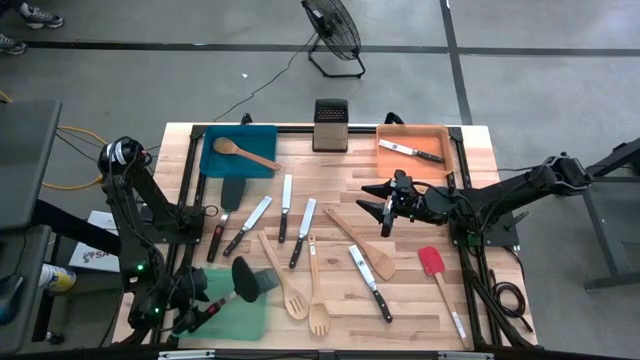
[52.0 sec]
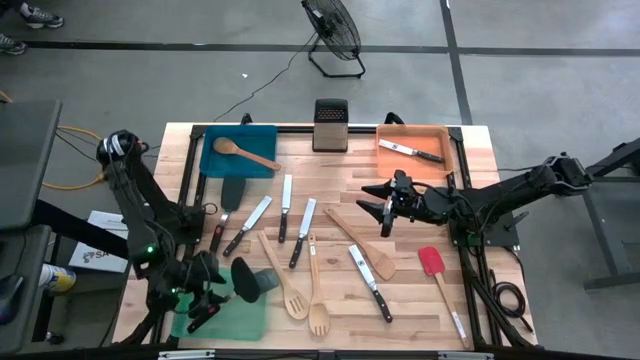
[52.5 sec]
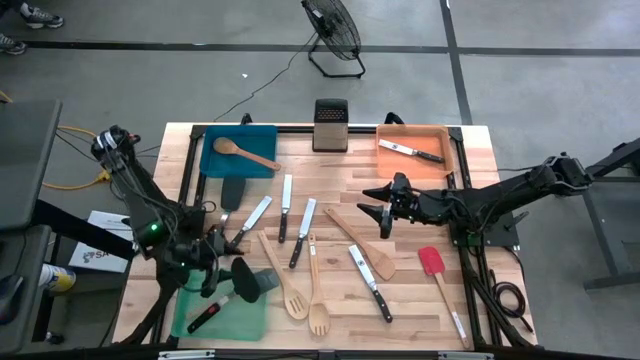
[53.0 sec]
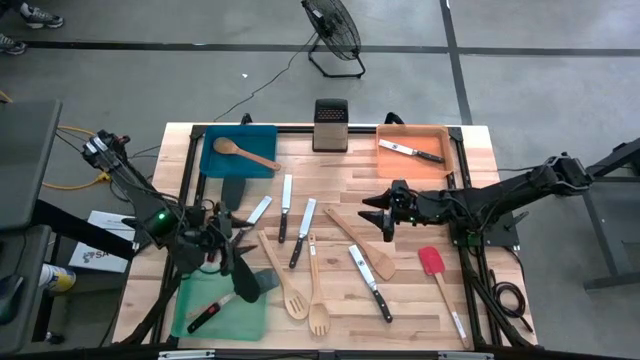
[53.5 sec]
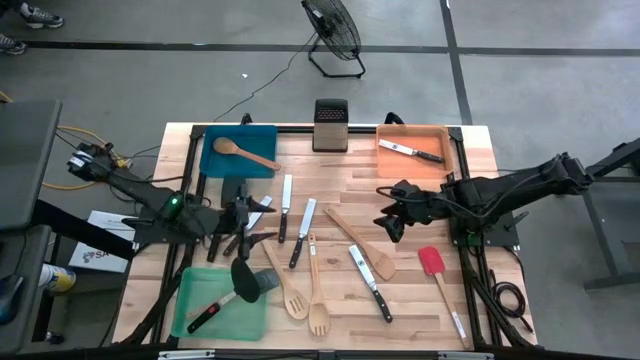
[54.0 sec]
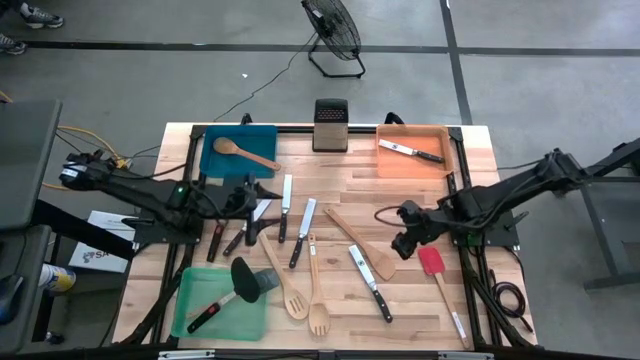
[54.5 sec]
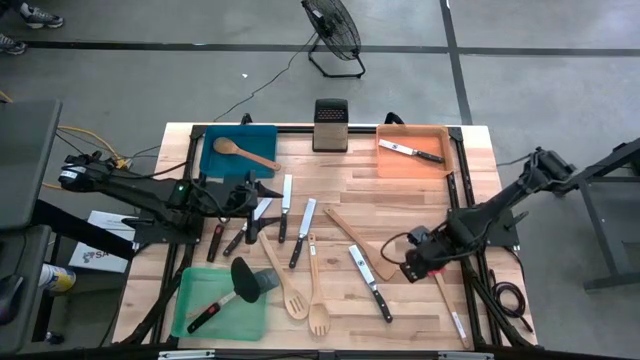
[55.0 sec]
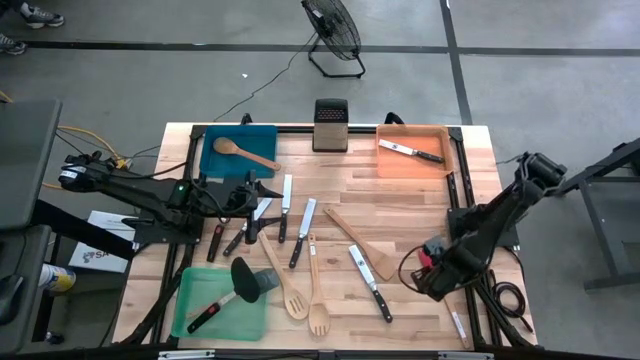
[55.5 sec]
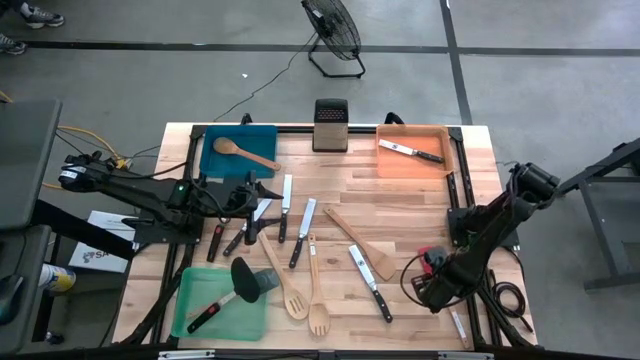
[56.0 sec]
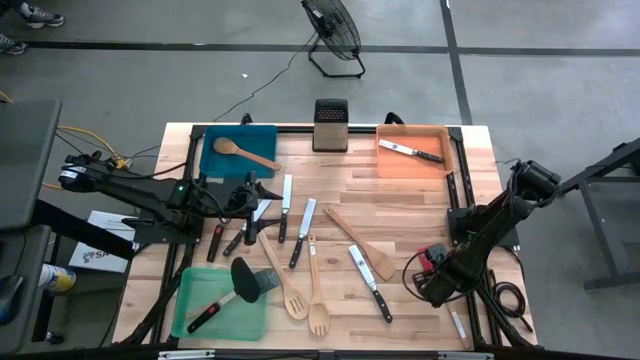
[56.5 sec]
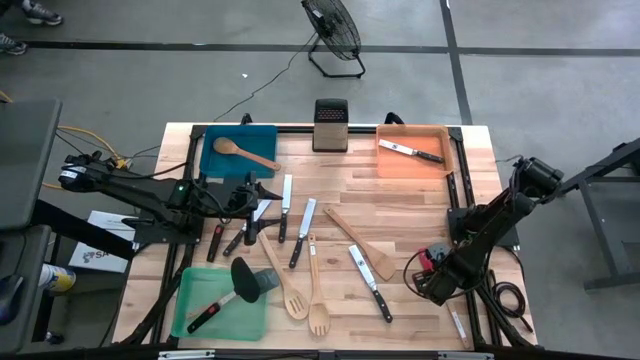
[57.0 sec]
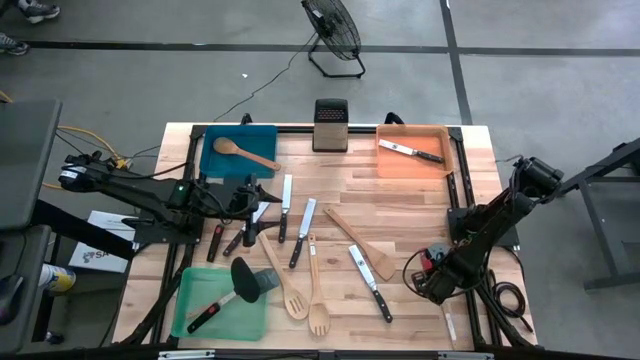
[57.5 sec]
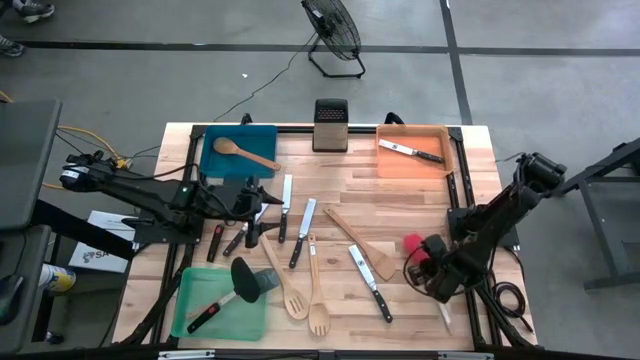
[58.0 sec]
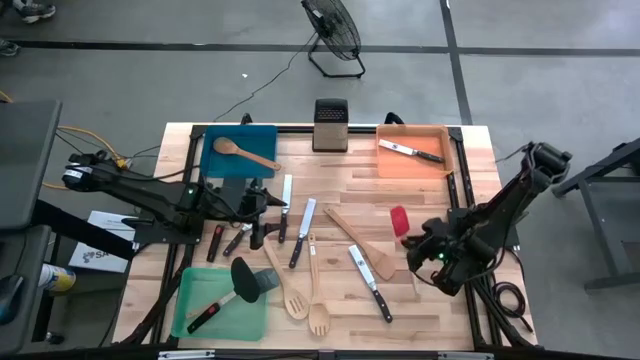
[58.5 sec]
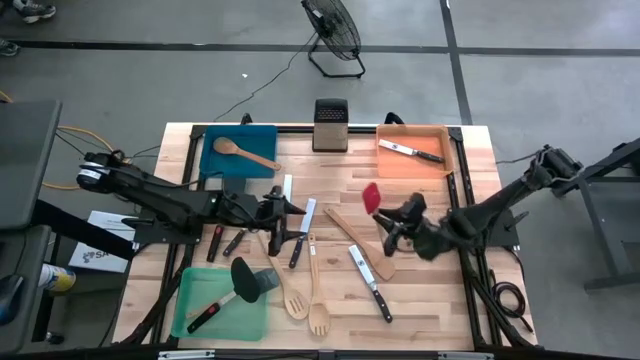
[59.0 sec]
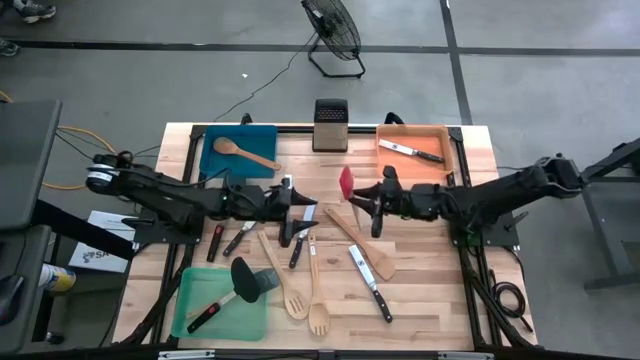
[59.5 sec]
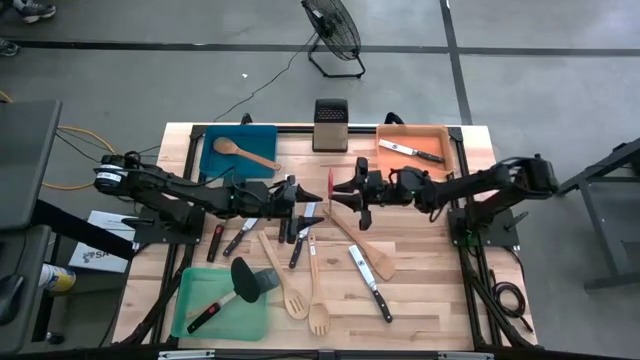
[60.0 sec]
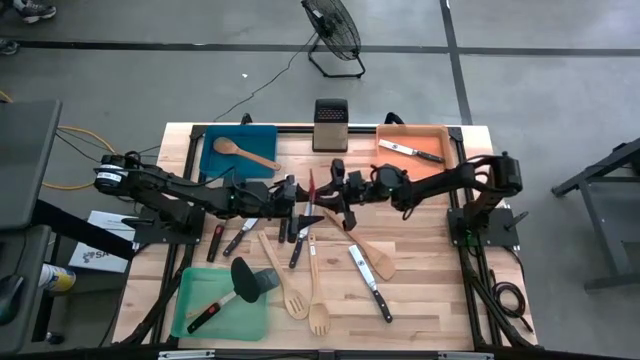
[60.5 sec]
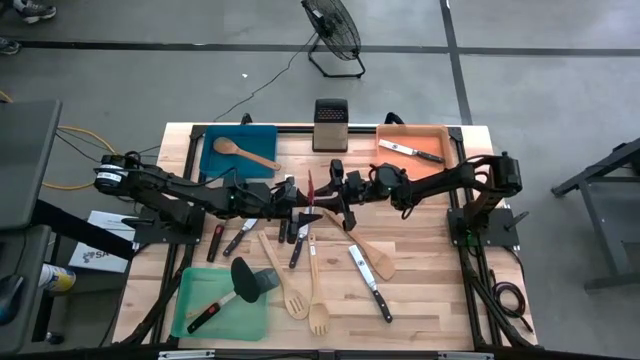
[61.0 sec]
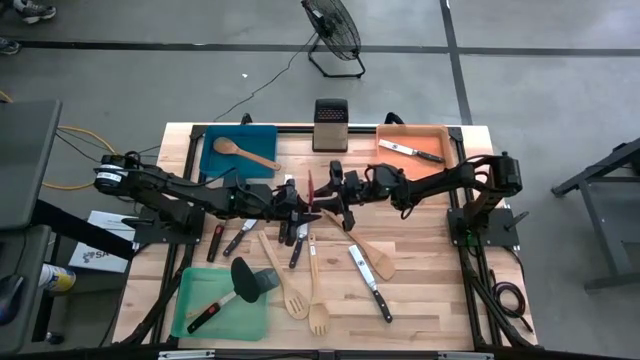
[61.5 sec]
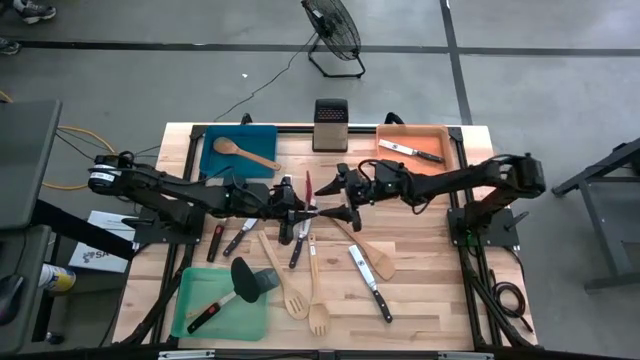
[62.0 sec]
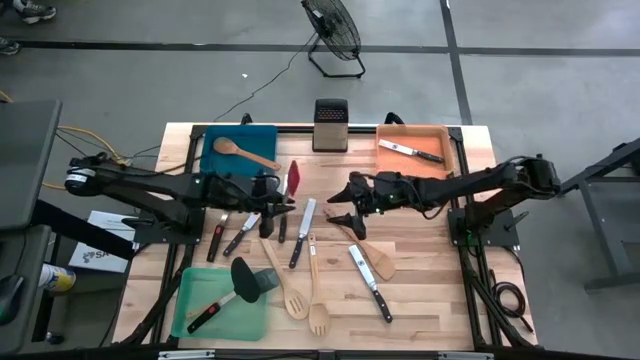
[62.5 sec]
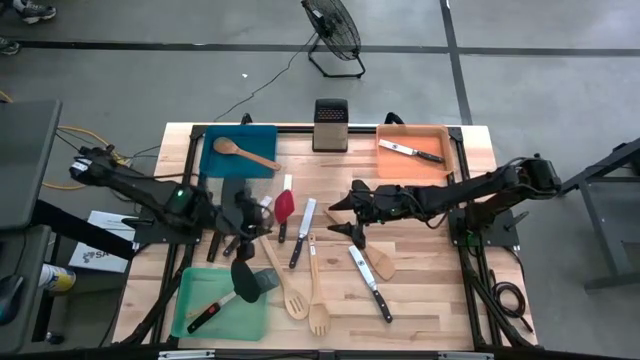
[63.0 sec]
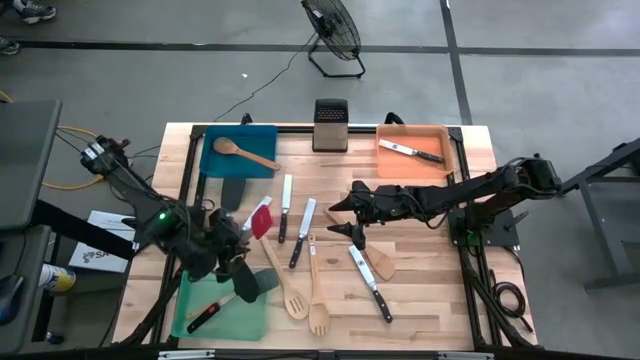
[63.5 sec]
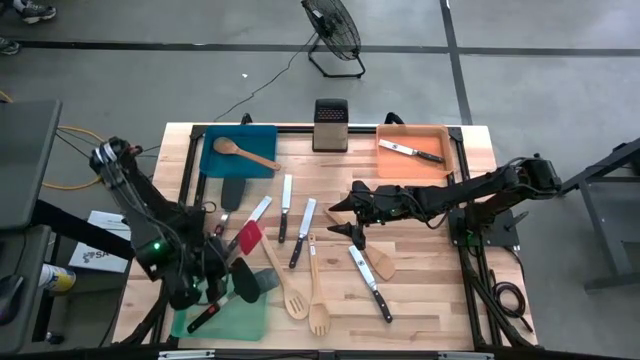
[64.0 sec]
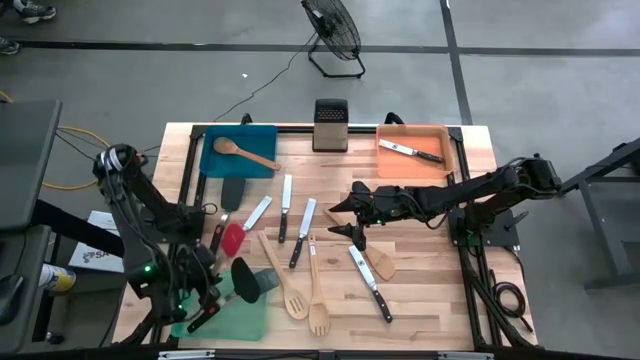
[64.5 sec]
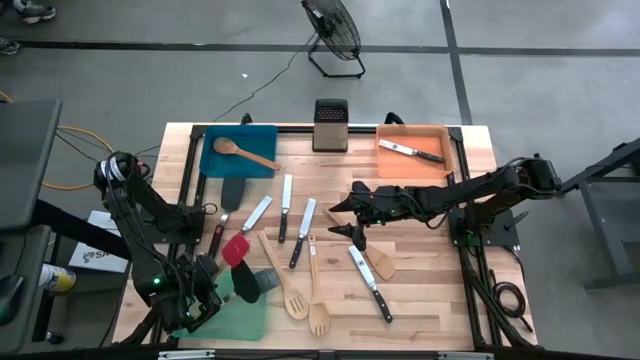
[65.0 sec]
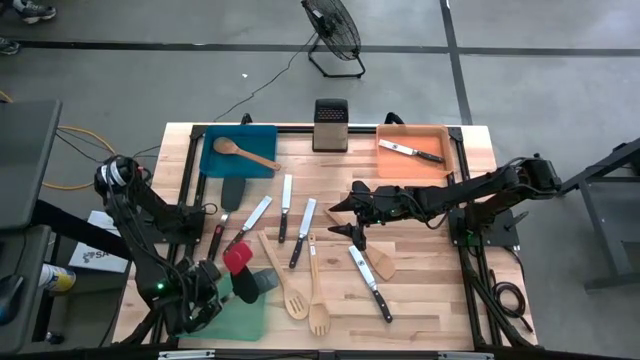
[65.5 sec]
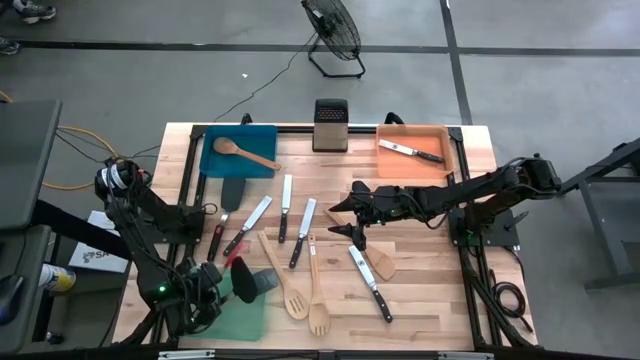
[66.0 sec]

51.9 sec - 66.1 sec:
Task: Pick & Place Kitchen Items
Put the red spatula into the green bin

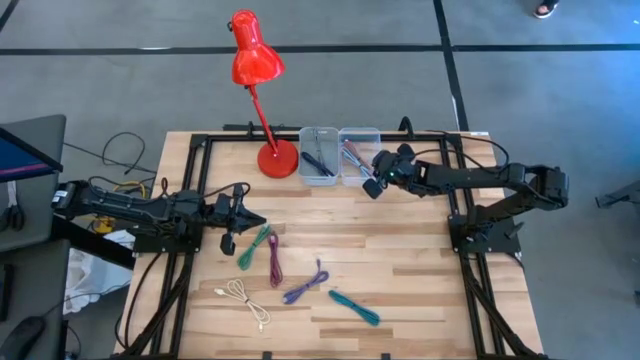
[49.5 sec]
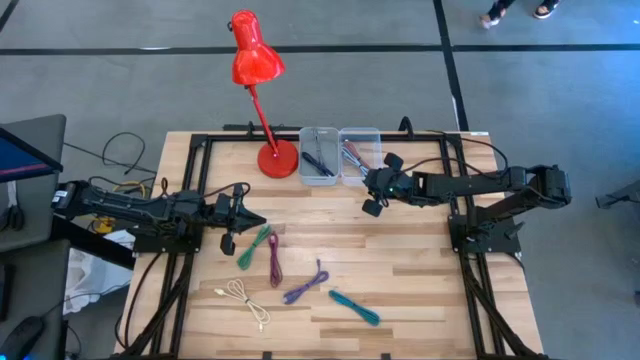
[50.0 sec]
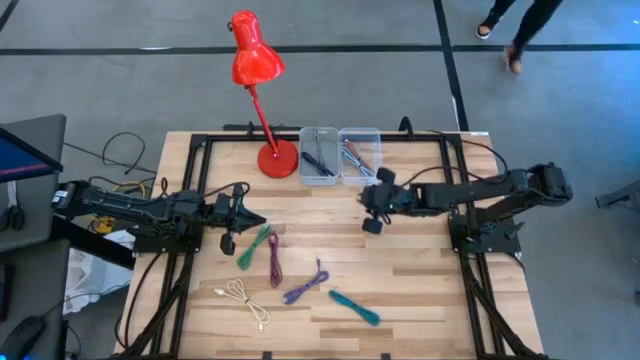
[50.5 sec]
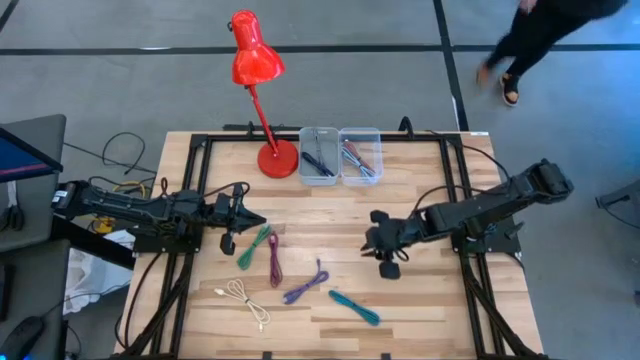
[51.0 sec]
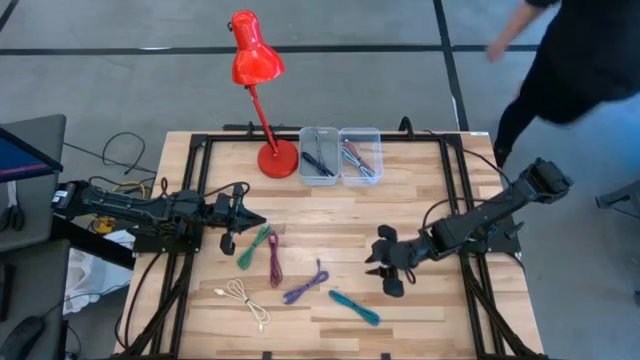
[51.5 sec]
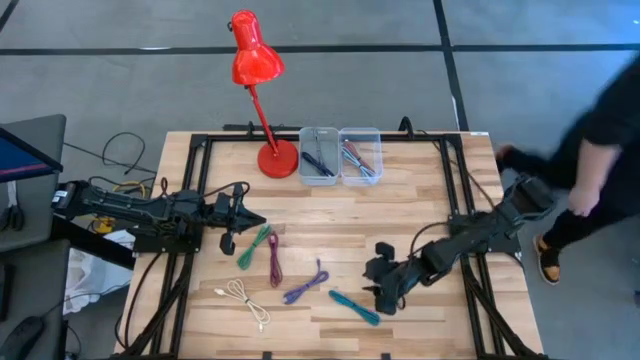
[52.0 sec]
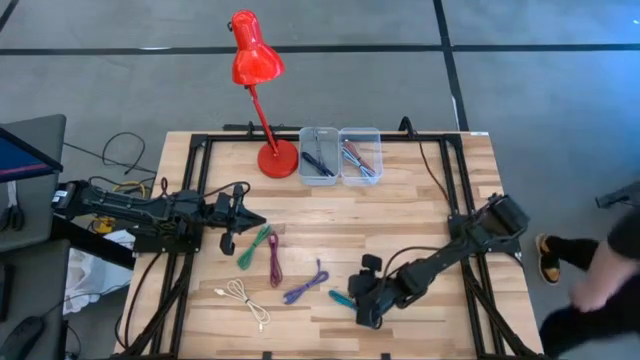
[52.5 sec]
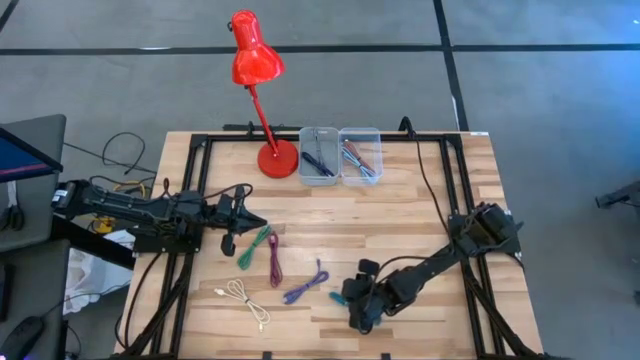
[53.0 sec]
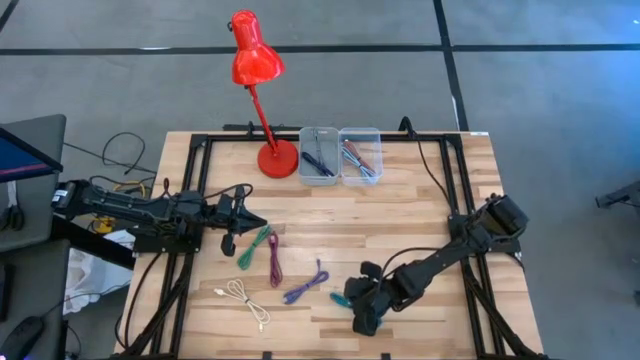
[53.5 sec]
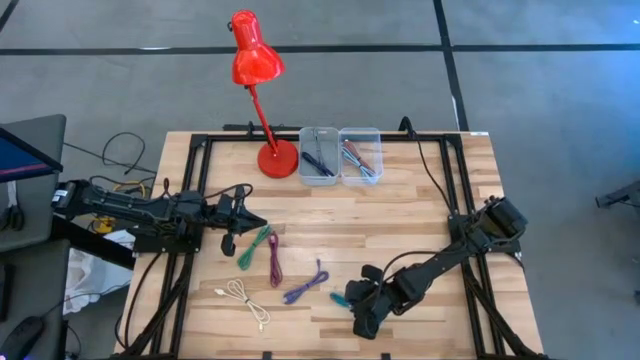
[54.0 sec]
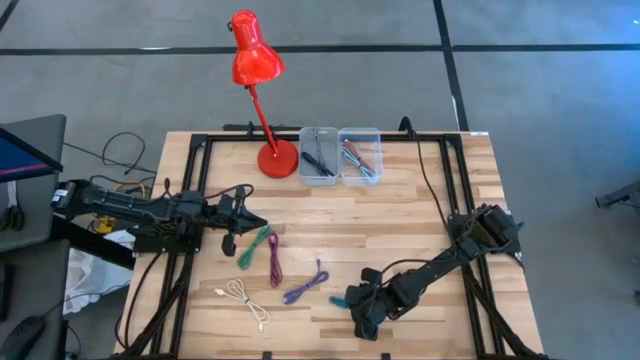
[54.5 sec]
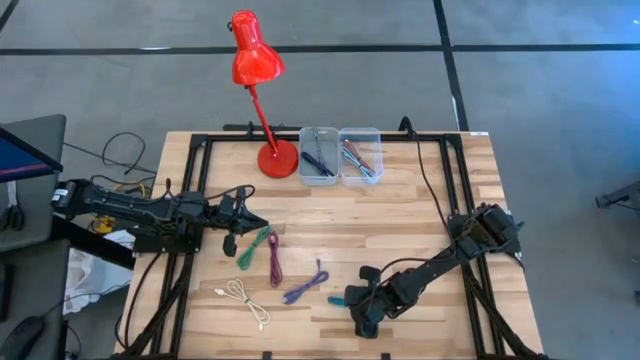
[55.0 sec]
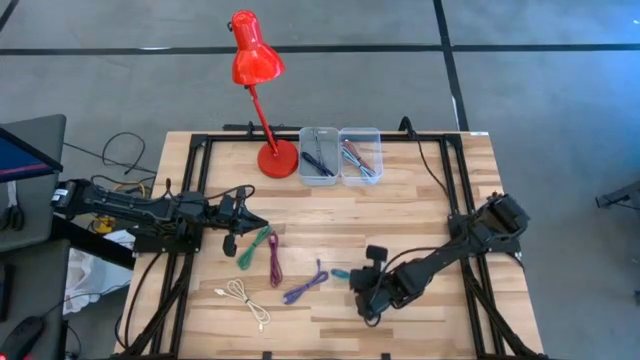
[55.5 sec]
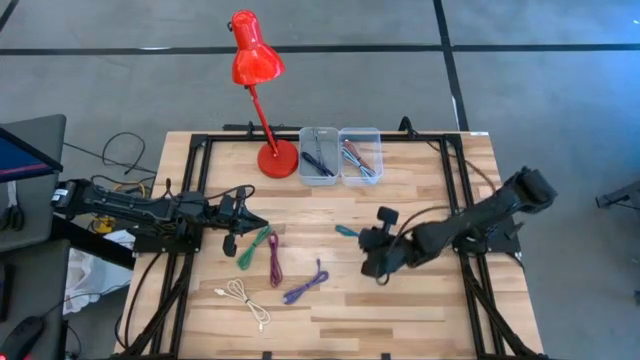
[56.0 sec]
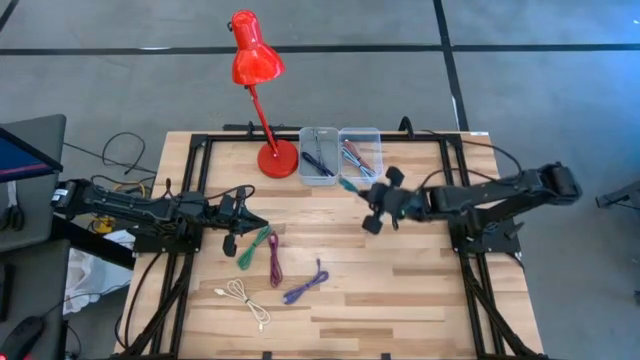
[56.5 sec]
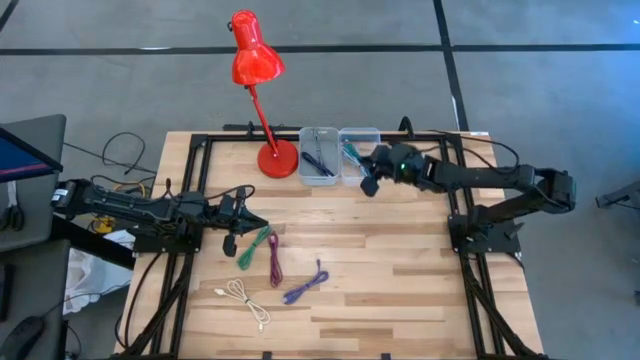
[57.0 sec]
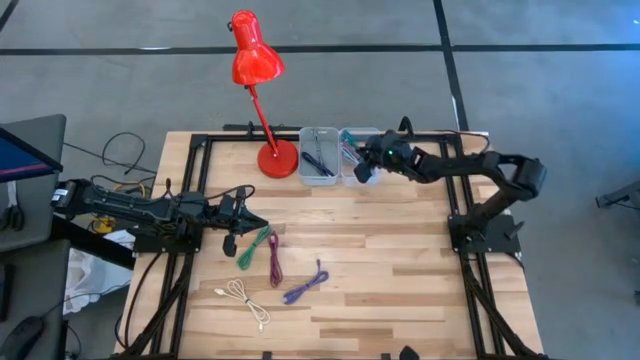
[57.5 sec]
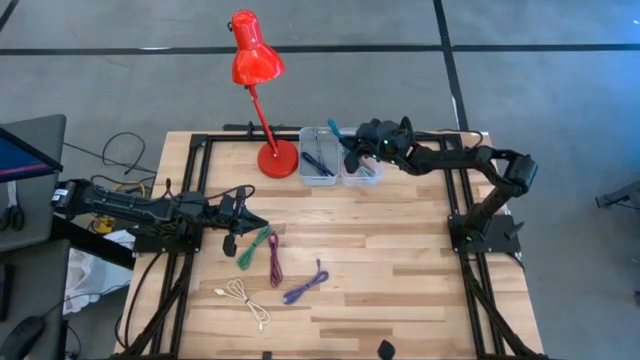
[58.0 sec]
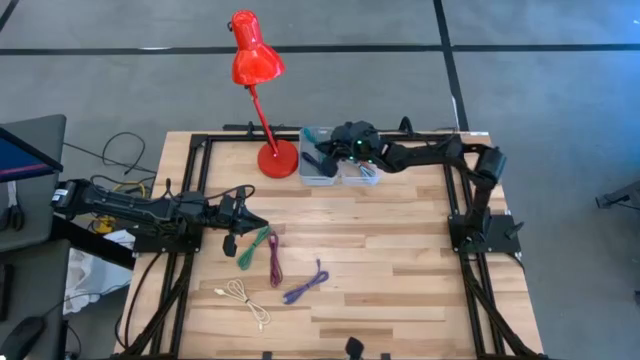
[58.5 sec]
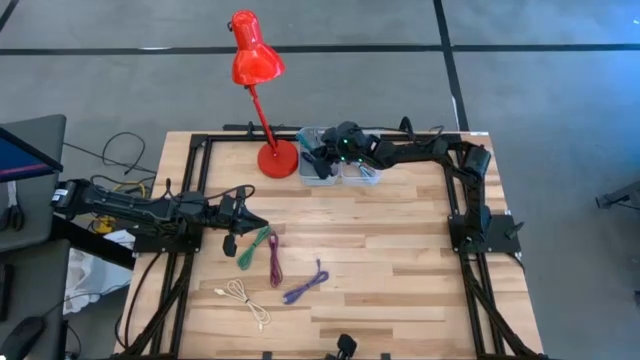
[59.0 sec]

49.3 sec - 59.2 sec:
Task: Pick & Place USB Port
Put the black and blue charger cable into the gray bin
